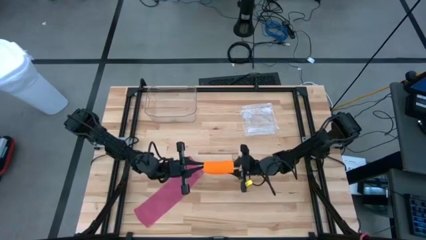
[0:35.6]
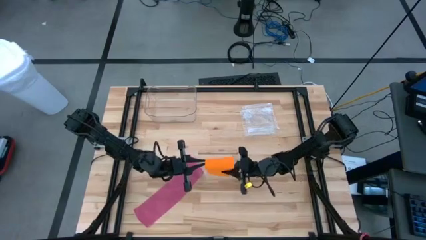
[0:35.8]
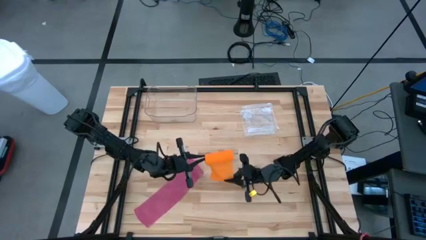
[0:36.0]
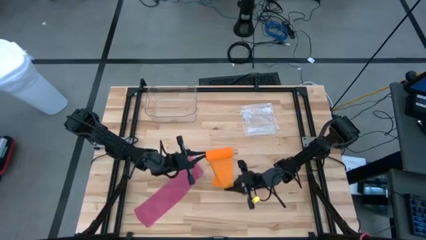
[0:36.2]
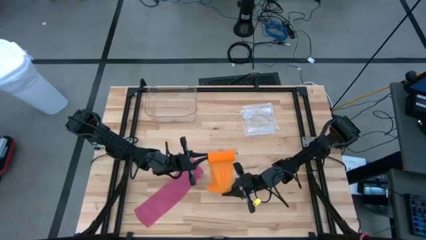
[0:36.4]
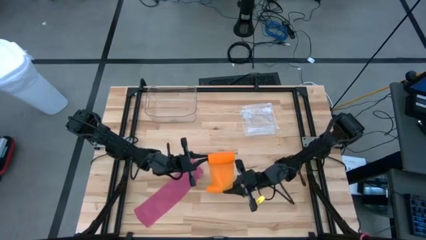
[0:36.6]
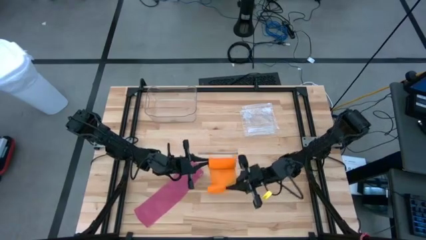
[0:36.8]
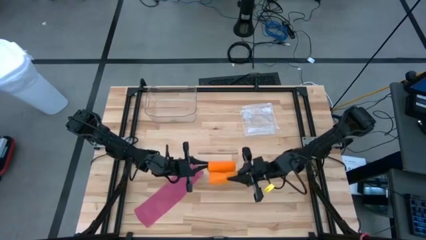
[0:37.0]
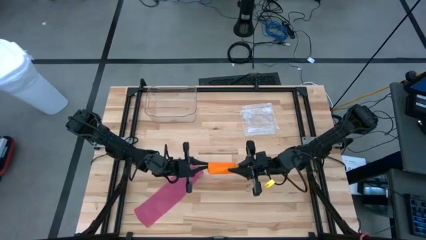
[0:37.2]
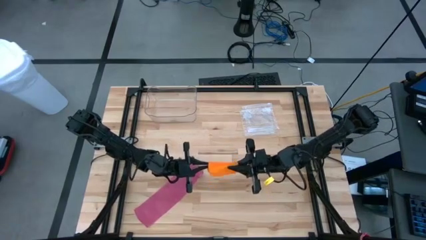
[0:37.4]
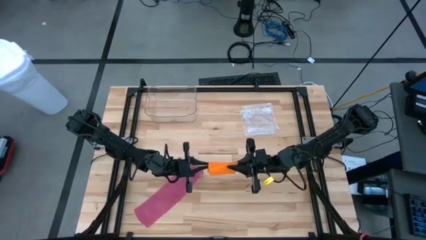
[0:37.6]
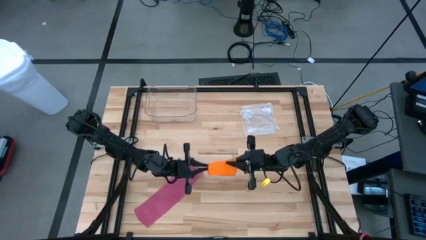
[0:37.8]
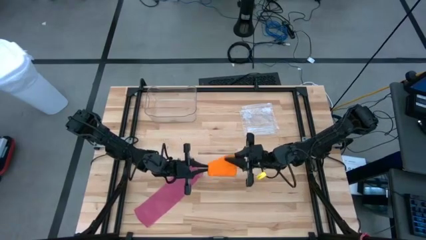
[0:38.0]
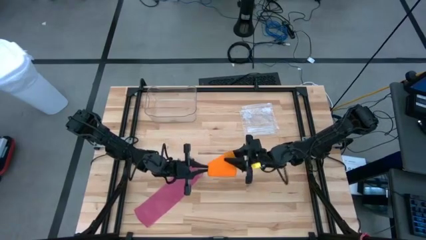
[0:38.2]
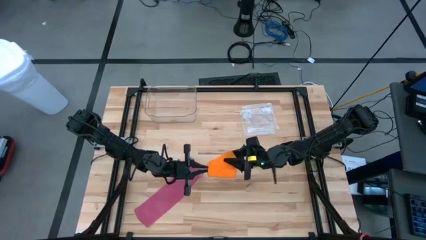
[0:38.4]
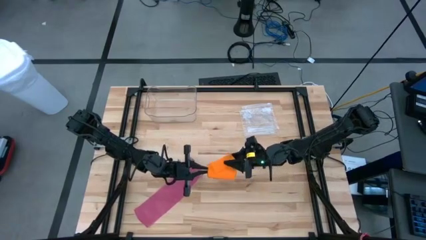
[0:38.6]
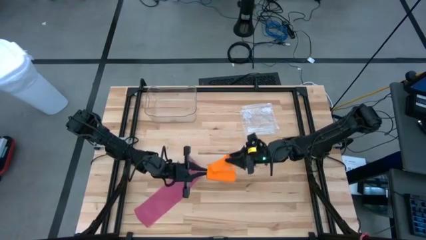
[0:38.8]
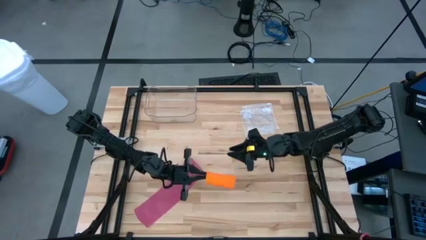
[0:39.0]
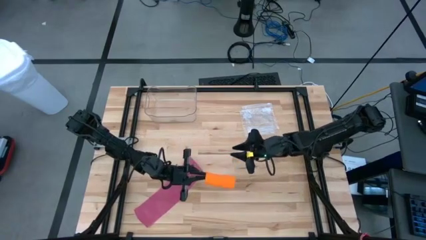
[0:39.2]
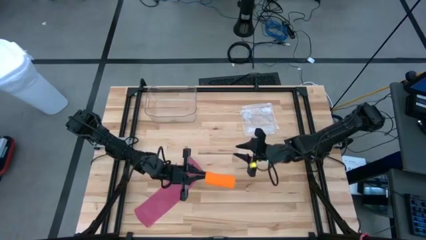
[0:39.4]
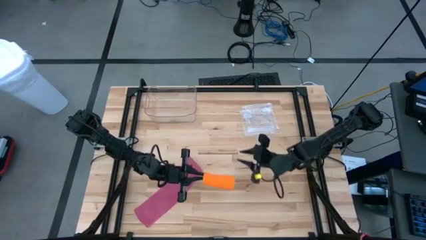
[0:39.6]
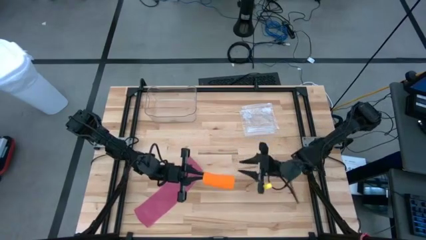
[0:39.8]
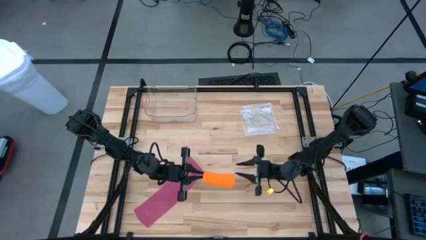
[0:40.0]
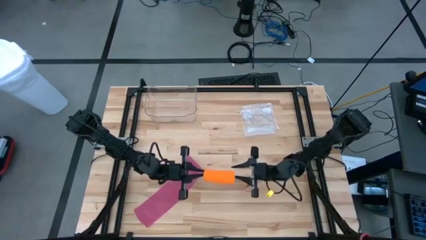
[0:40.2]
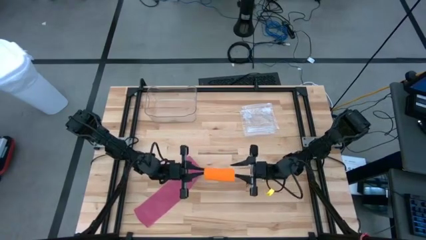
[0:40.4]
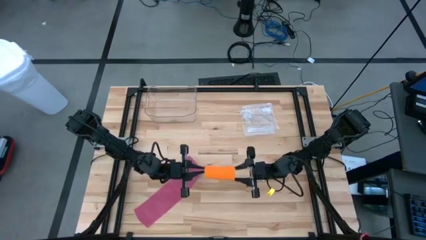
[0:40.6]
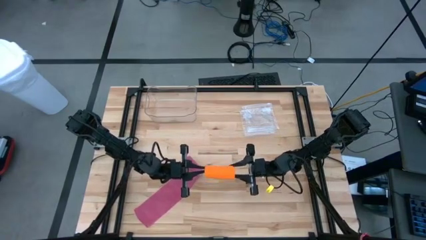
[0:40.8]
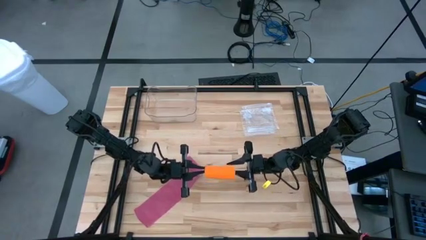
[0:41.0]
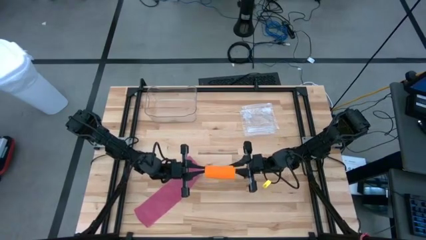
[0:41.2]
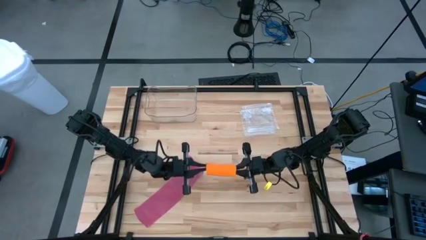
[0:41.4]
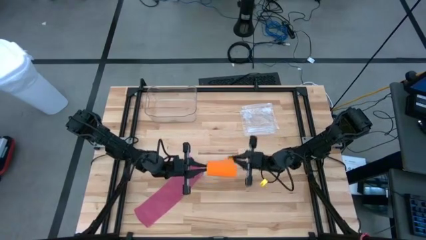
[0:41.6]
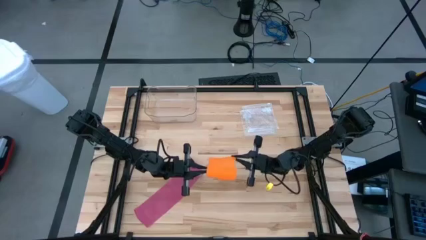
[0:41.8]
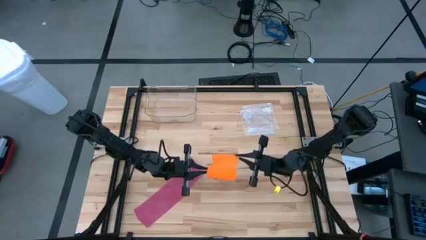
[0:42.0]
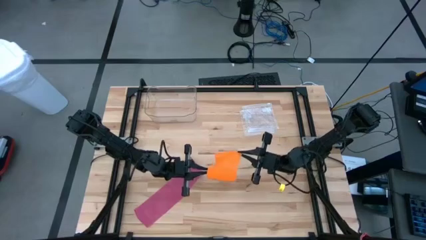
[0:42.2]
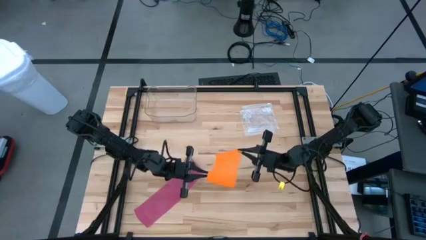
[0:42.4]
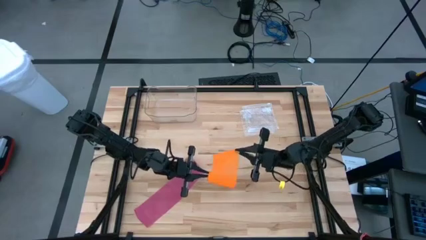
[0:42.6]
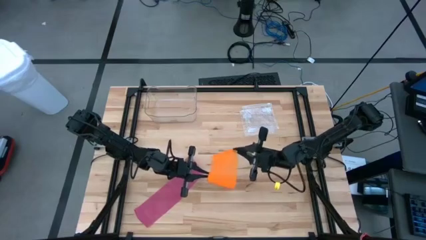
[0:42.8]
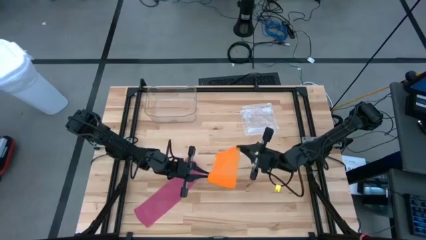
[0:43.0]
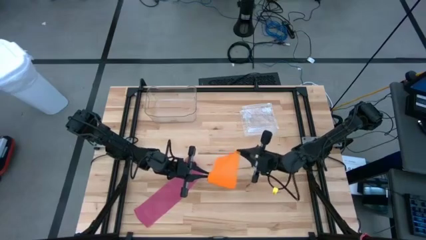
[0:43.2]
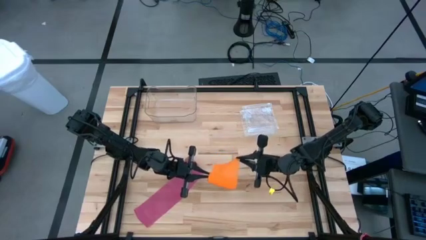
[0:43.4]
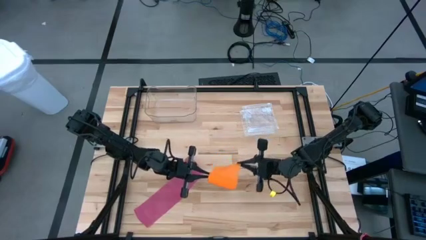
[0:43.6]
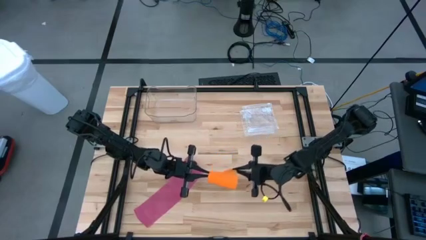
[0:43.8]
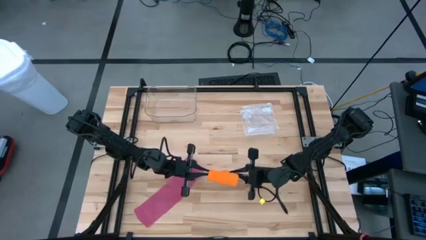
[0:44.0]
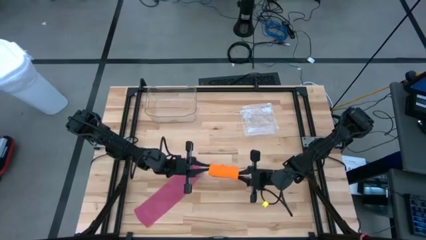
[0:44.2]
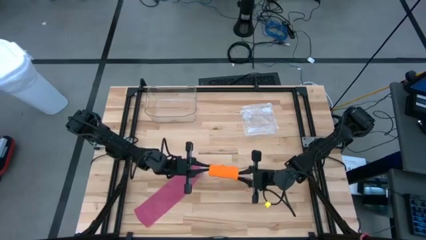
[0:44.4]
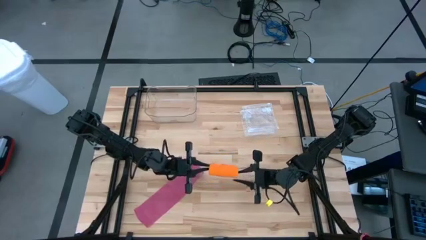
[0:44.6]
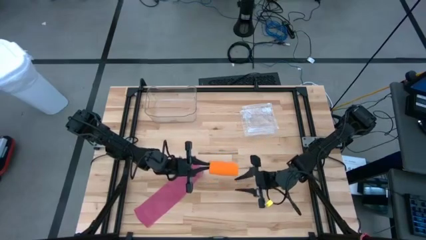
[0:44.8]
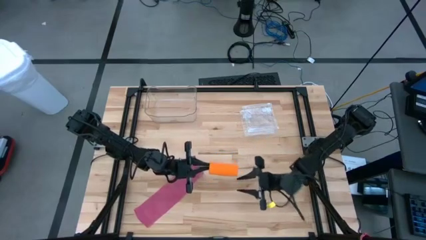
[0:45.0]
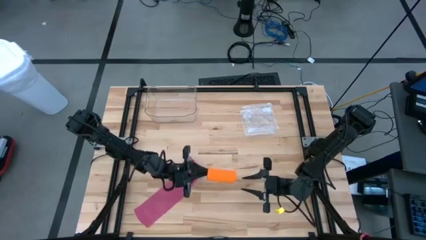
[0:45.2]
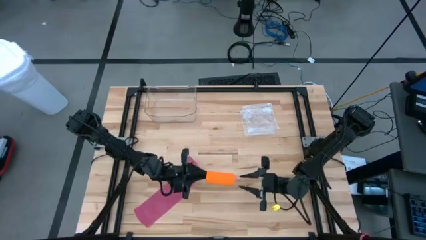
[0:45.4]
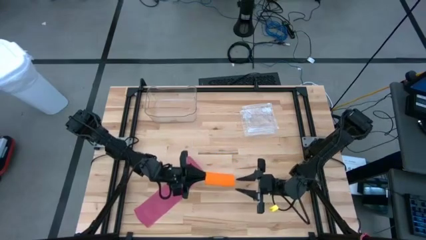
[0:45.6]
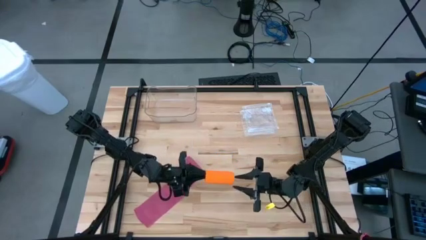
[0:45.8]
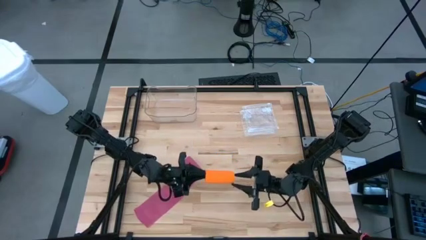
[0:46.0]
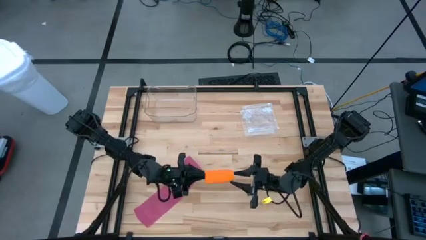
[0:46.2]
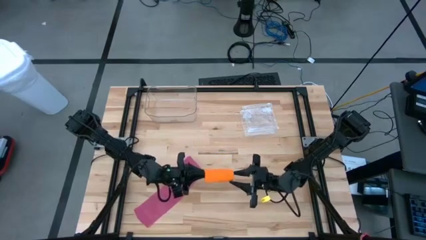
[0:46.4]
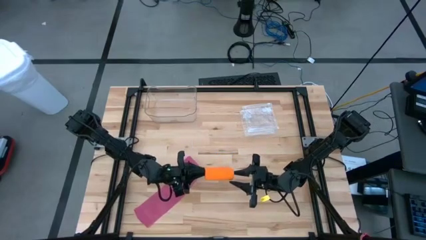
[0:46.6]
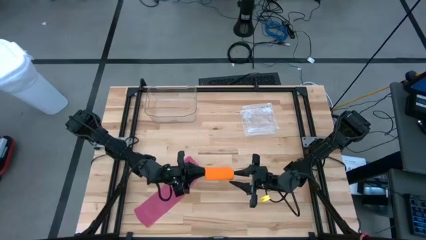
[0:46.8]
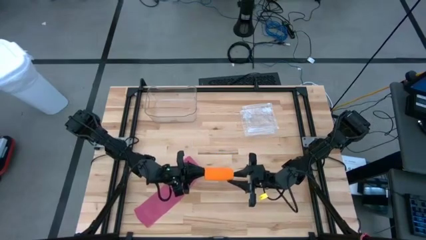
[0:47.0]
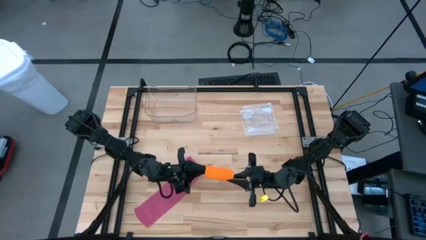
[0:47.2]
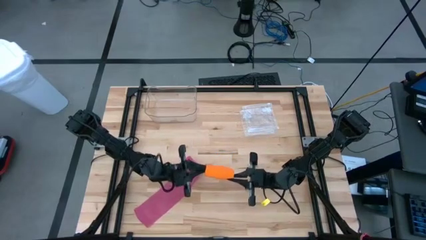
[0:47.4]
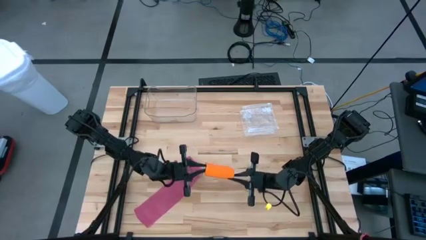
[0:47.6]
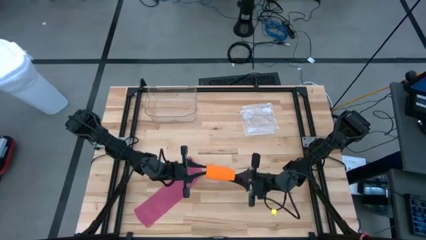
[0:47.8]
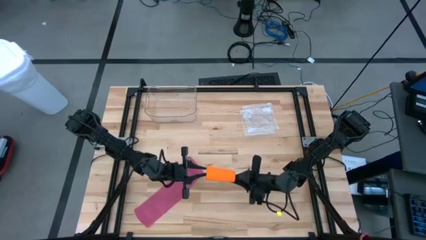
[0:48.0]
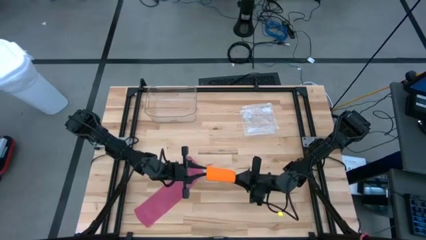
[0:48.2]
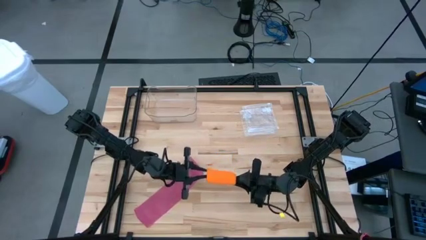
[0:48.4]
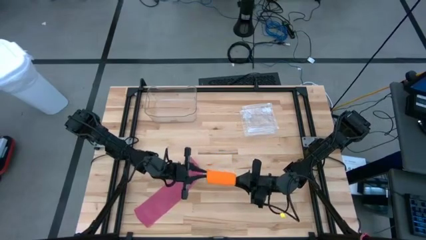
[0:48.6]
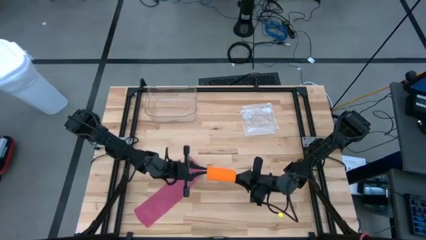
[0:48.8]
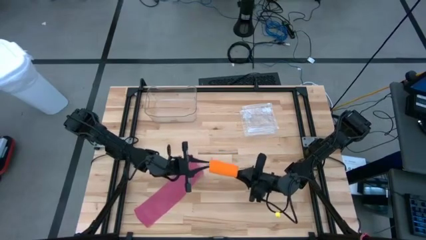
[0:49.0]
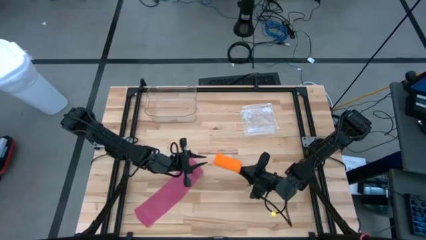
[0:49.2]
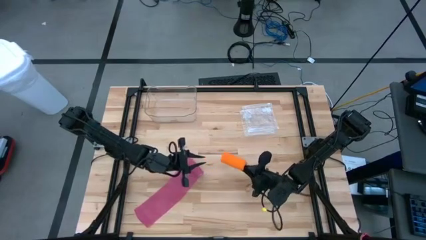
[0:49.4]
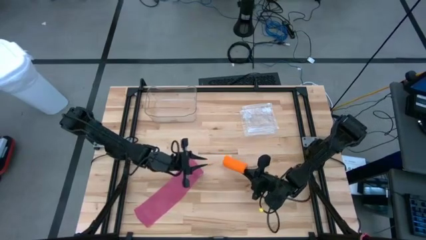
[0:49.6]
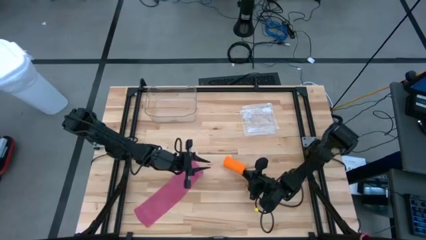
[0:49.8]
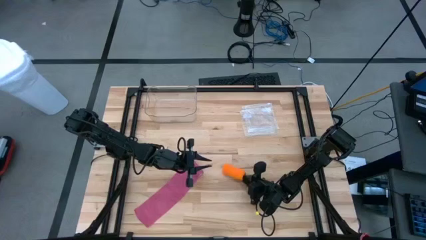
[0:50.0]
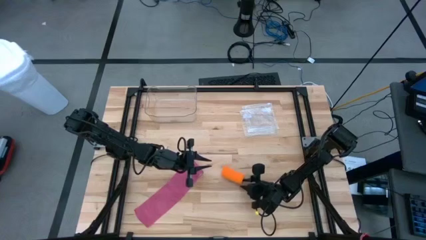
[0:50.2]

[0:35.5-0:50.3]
Task: Roll bandage
Roll the orange bandage

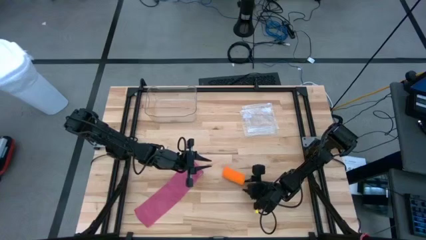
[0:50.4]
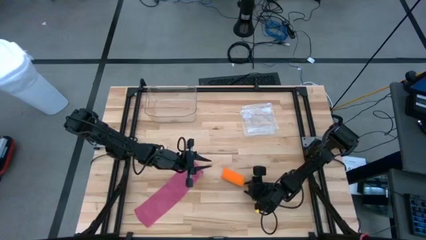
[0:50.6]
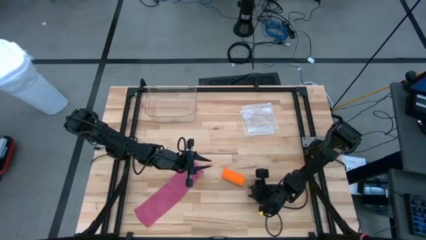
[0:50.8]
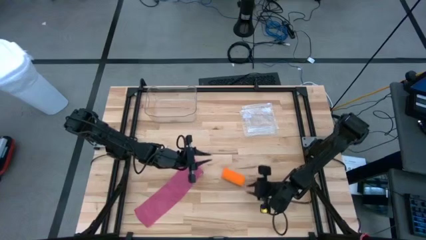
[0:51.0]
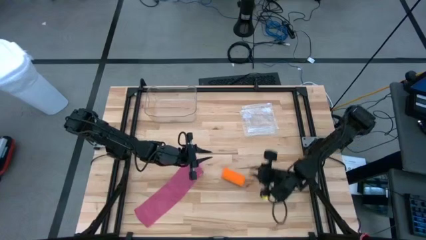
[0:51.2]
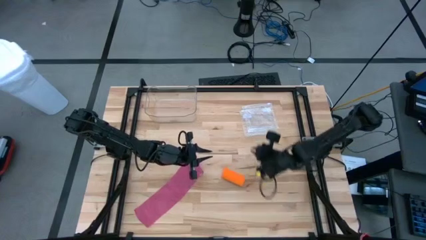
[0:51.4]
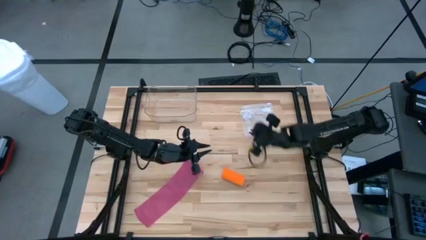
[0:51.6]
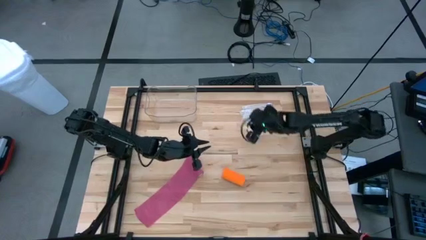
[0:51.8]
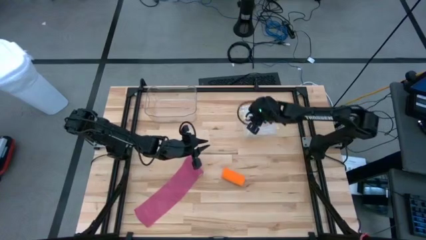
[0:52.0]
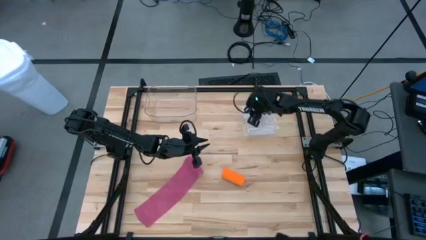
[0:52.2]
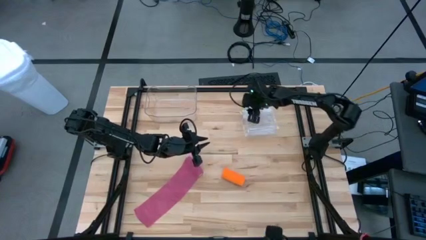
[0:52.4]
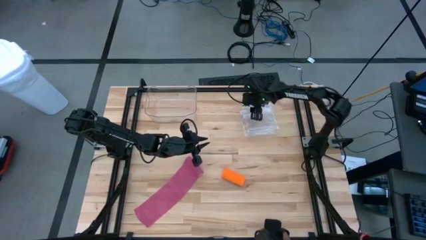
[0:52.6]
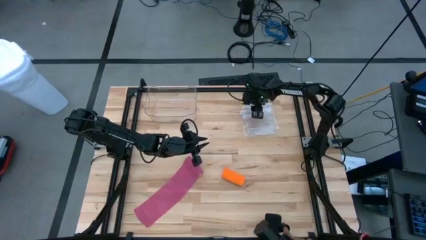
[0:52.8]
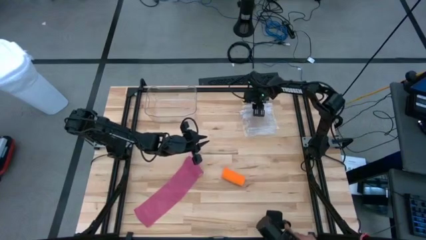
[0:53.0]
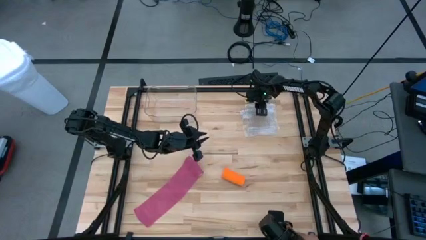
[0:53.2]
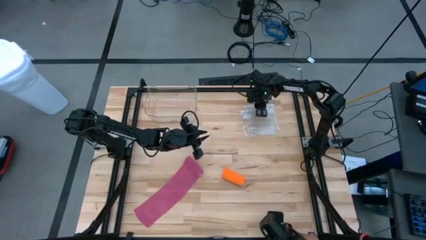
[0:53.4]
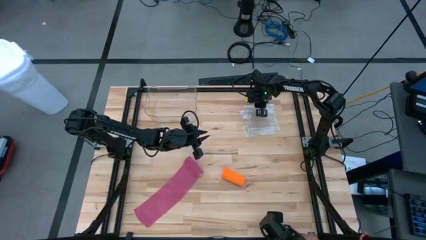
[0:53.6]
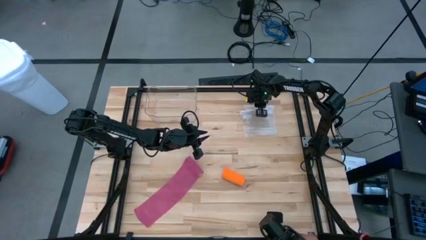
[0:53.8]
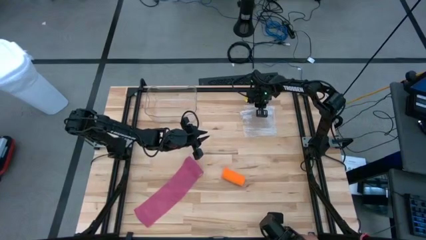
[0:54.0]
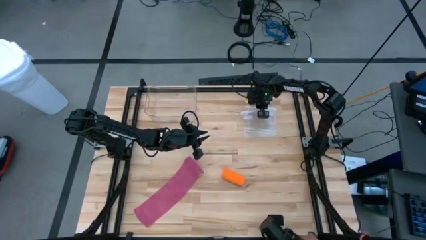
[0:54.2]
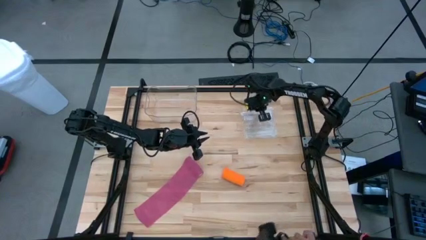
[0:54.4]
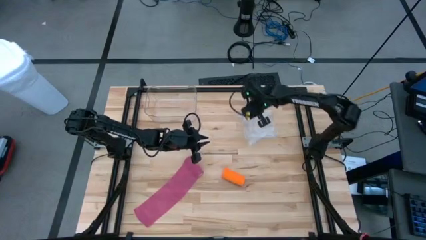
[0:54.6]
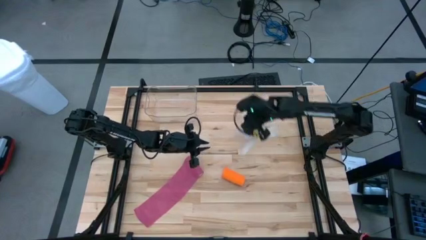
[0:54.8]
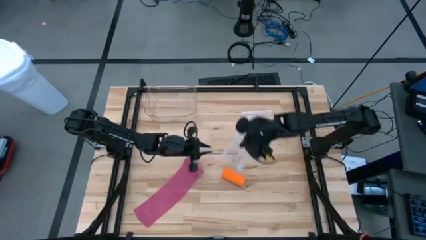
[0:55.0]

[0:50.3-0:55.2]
Put the rolled orange bandage into the transparent zip bag
